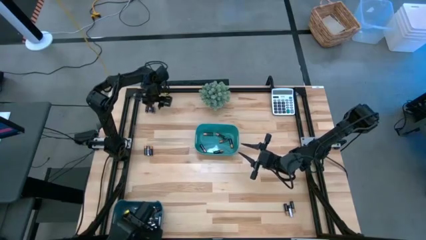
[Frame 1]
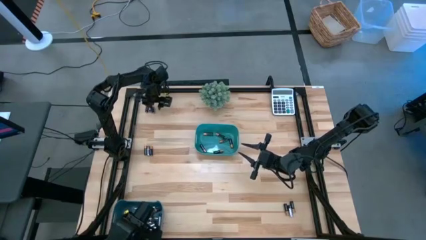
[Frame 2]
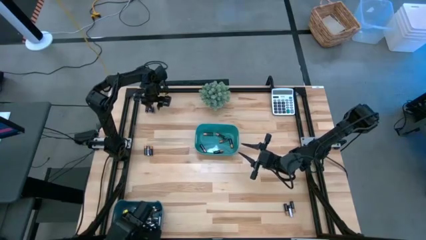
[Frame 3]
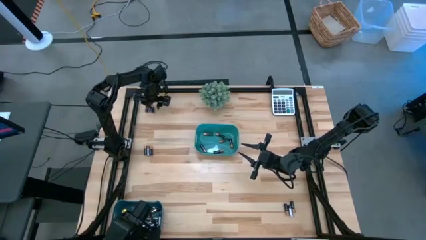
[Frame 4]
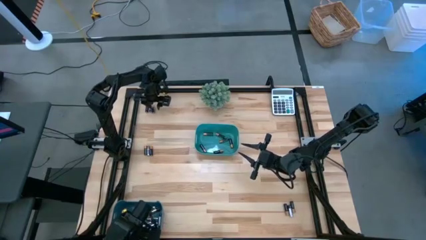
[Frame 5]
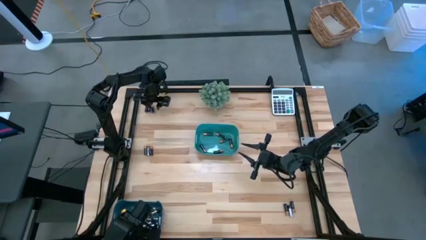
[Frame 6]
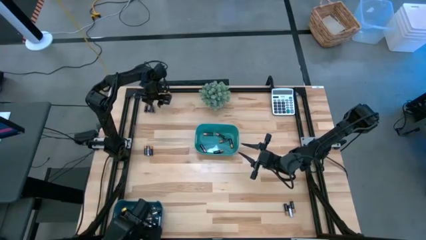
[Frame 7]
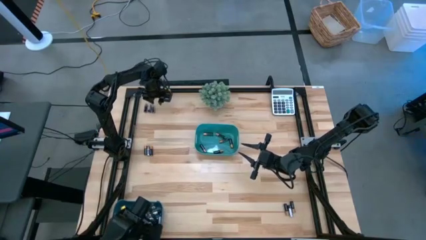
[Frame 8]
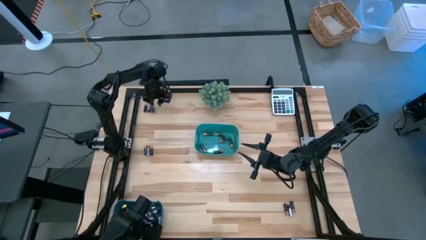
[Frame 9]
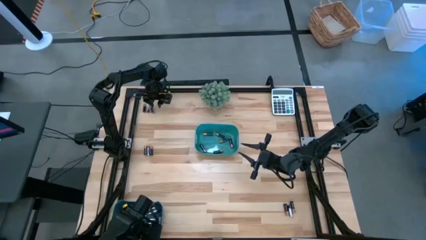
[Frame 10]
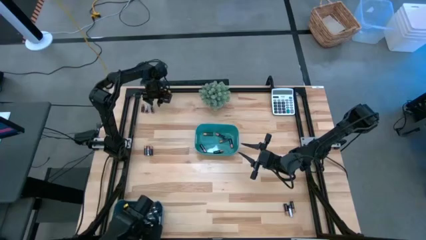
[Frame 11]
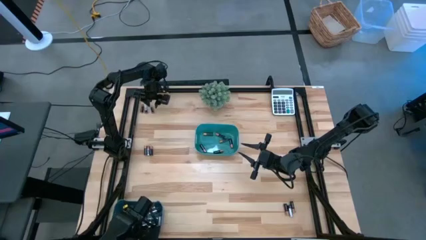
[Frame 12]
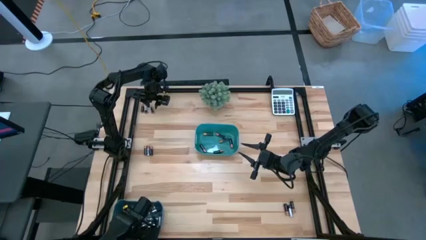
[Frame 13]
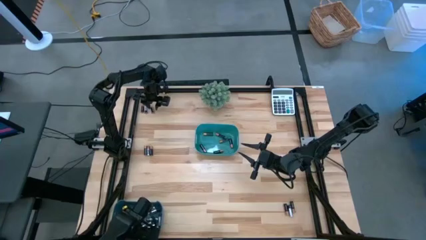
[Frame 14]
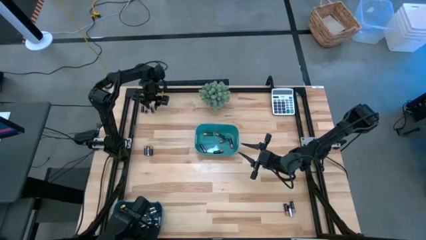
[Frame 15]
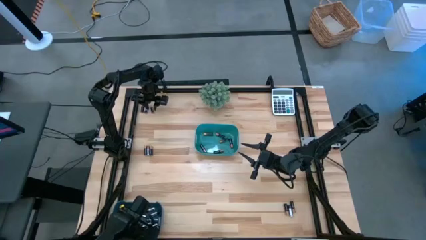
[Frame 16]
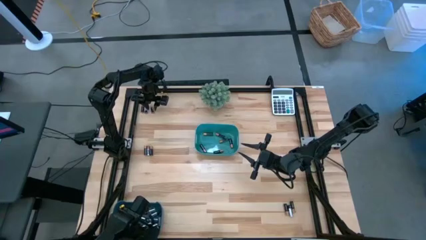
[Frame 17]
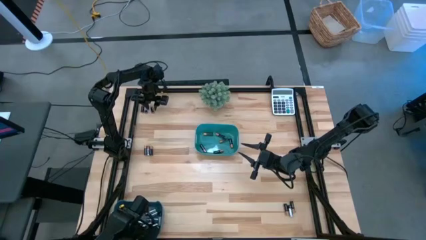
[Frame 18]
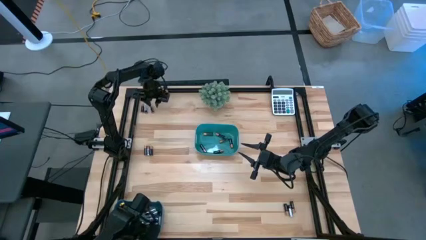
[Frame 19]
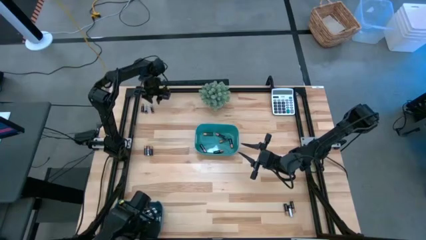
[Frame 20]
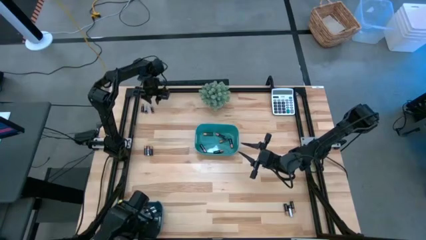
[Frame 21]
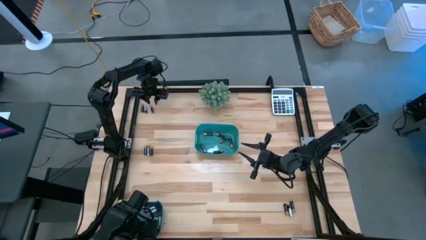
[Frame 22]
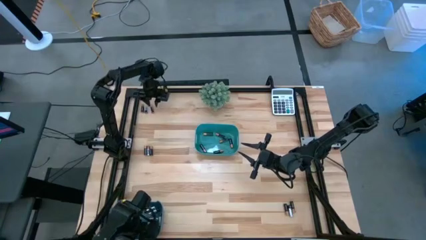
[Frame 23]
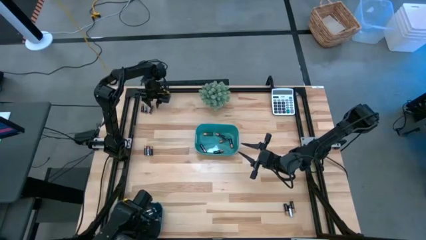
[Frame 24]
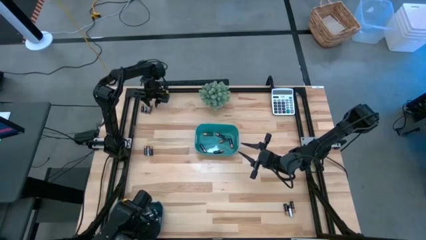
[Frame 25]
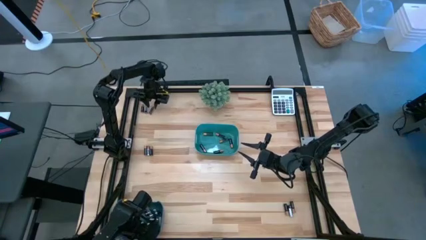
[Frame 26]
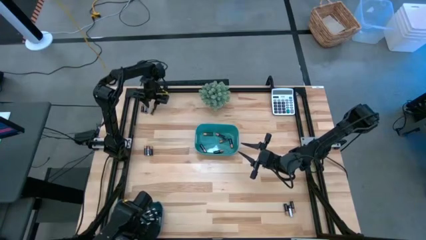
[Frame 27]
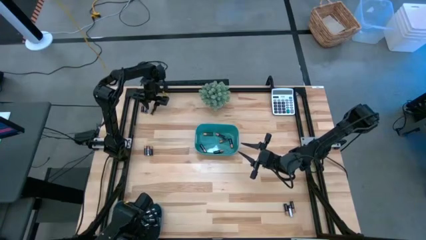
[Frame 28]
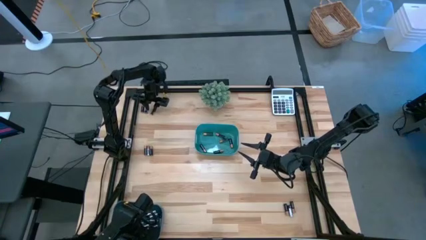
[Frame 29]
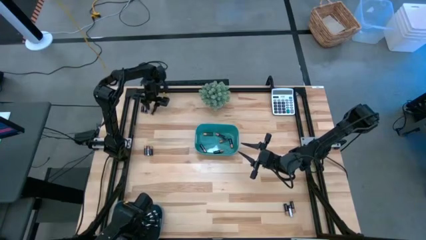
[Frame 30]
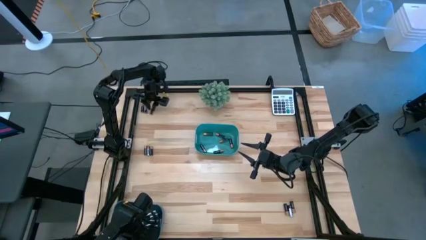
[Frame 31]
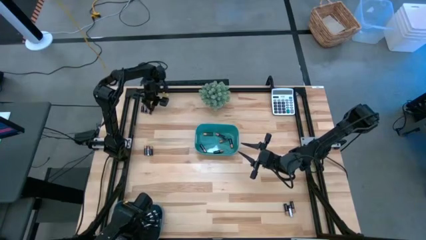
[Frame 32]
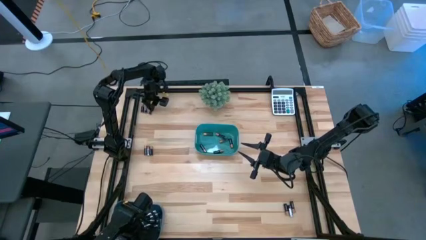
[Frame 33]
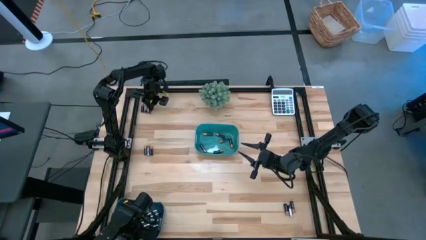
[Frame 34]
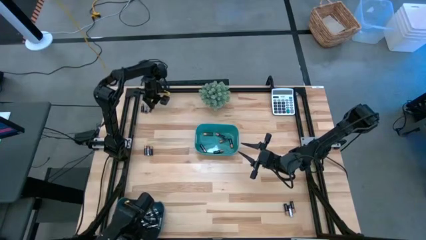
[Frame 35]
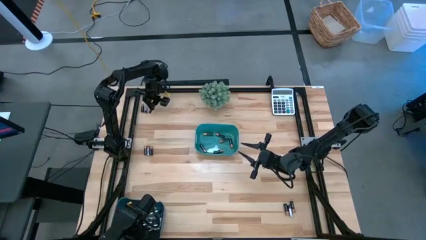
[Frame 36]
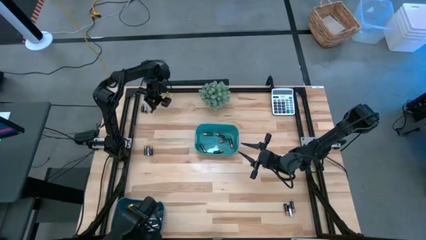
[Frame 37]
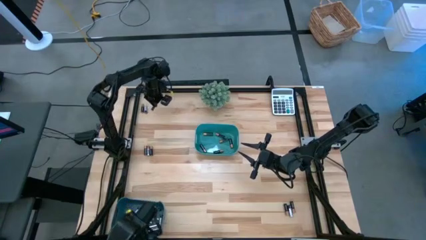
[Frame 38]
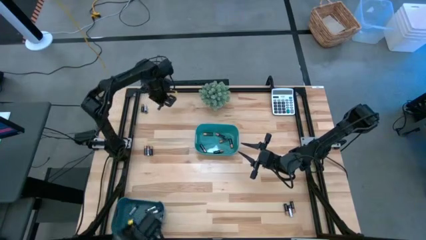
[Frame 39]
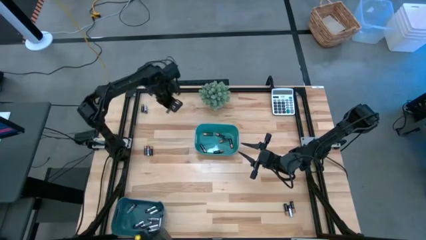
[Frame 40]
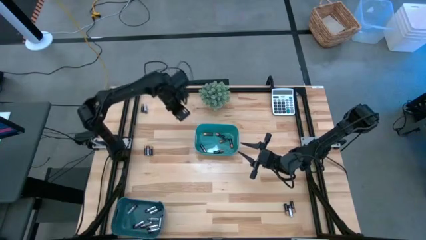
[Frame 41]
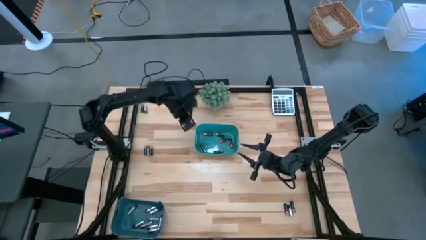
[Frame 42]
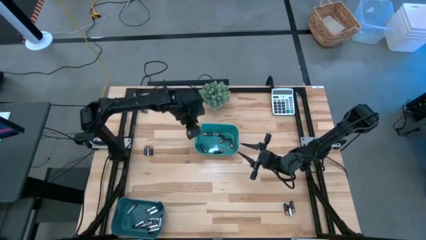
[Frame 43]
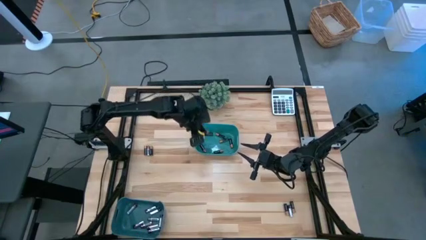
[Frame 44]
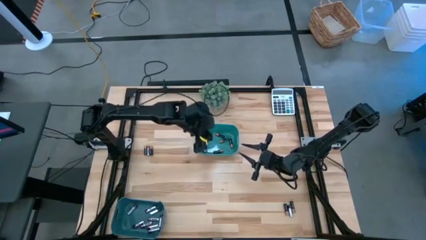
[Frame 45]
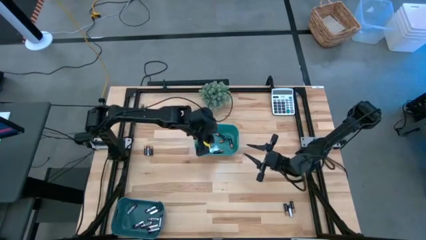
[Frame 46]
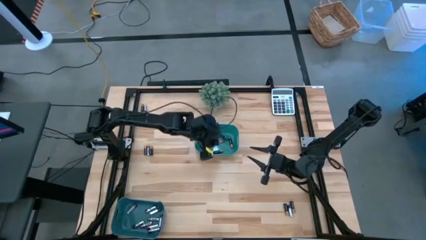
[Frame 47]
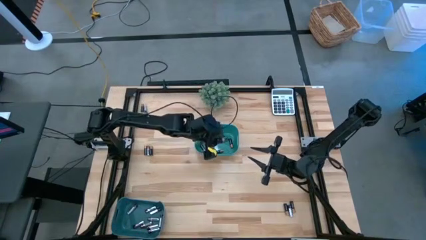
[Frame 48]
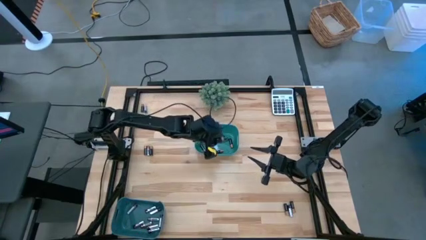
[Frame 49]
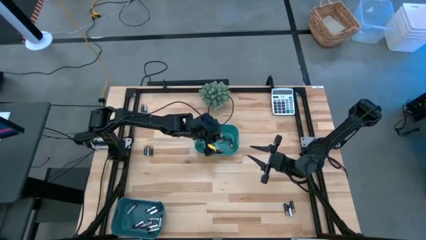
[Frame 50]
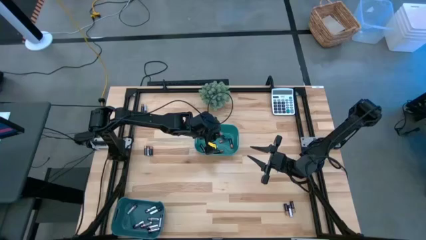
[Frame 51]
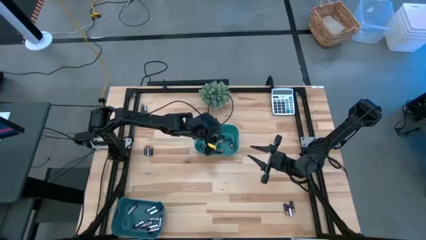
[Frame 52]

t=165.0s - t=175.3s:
Task: Sort batteries
Put the black battery into the green bin

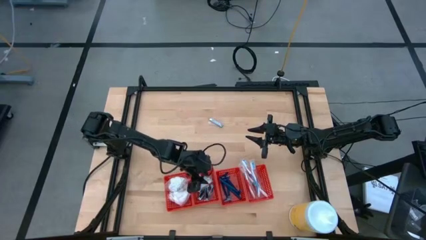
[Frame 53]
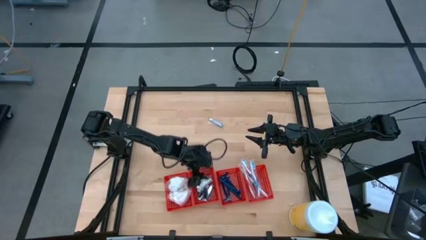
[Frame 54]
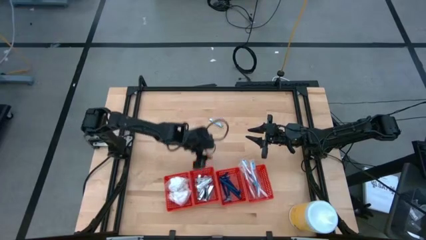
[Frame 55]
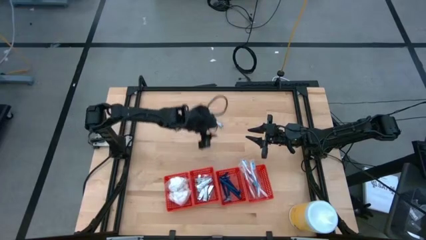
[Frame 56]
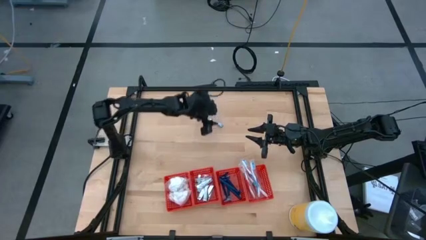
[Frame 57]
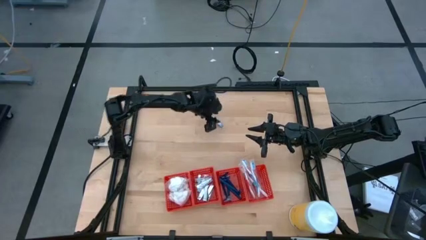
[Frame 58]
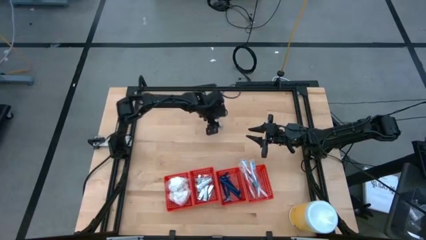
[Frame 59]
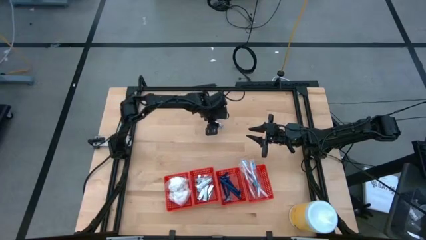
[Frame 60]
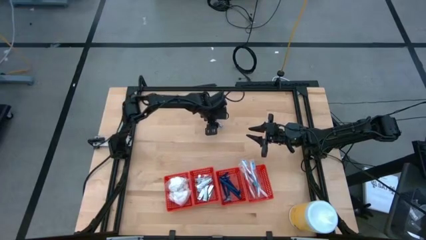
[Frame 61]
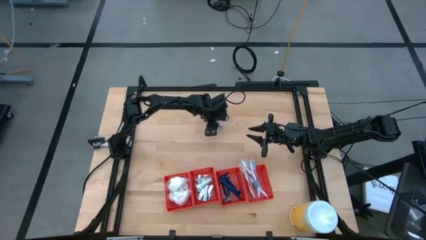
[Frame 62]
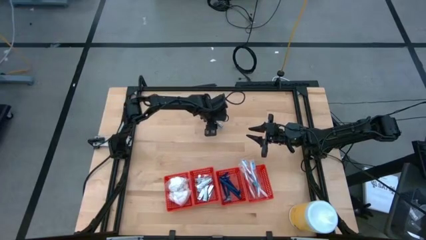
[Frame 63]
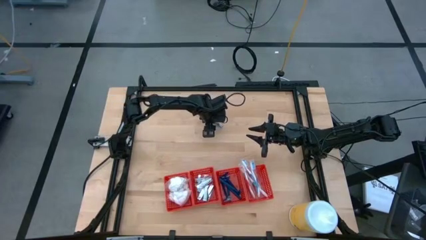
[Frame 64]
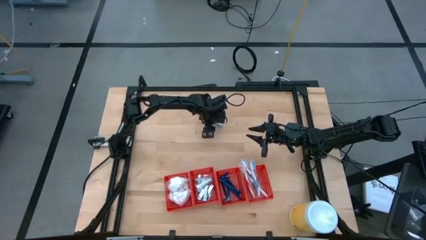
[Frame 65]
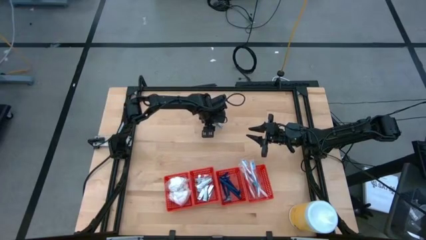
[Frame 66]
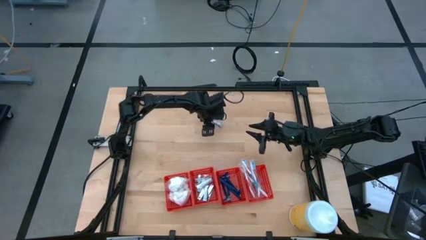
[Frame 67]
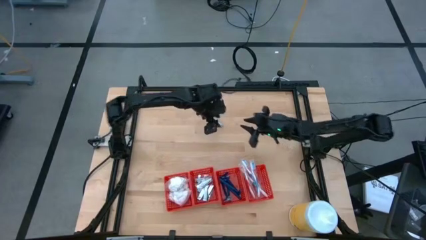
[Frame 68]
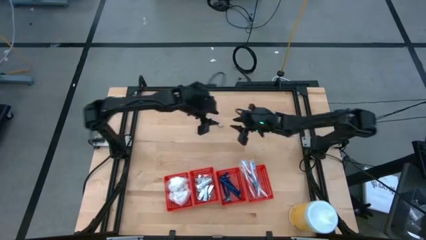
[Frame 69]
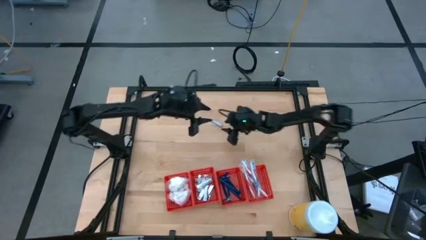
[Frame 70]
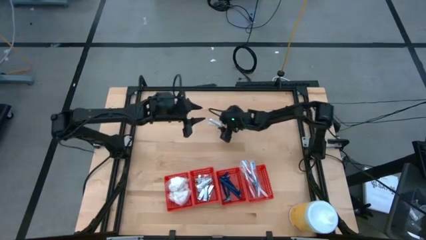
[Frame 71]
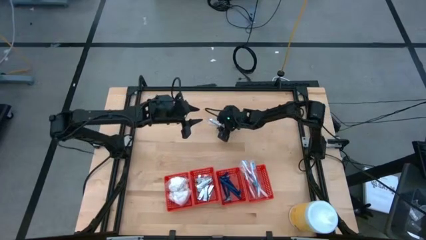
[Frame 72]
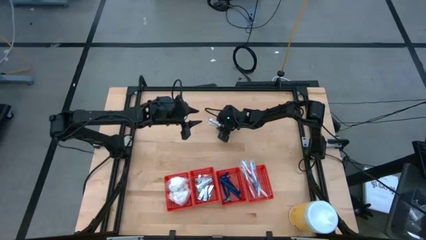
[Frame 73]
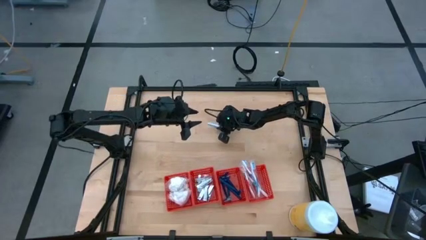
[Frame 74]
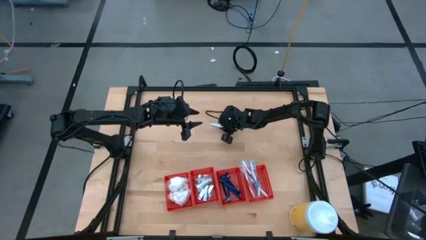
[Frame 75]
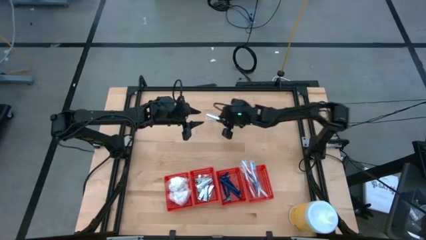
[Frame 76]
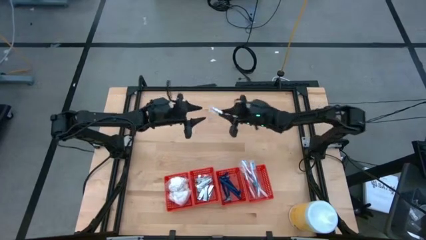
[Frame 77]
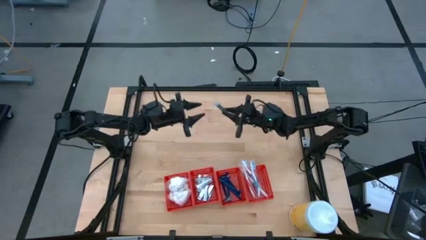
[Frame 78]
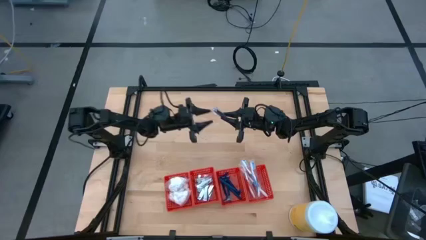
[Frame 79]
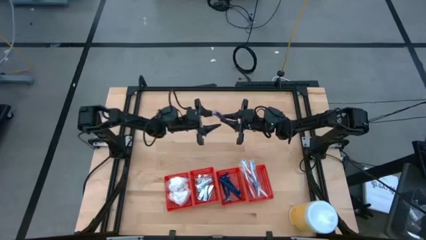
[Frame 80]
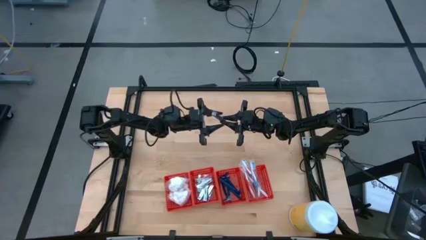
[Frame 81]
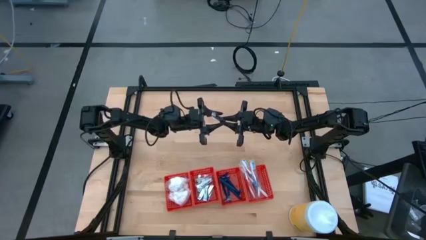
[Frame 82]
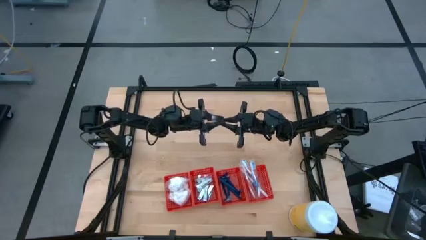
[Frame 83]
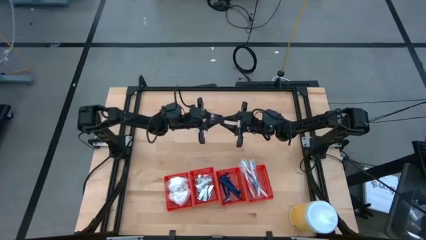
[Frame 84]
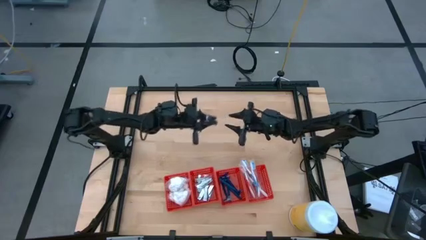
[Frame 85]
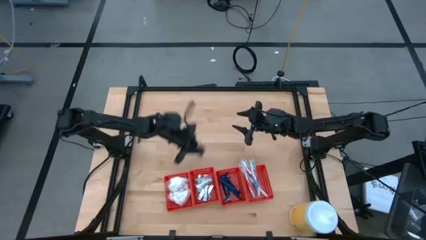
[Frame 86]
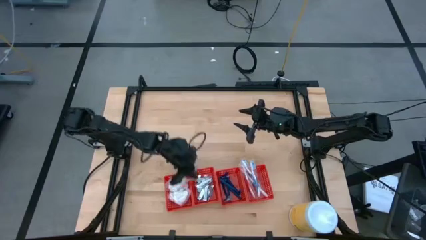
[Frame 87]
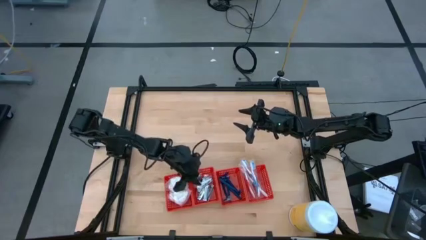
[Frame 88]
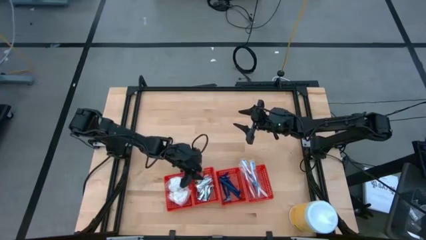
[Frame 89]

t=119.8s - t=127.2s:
Task: Pick & Place Travel size toiletries
Put the silver nail cutter into the middle left red bin
